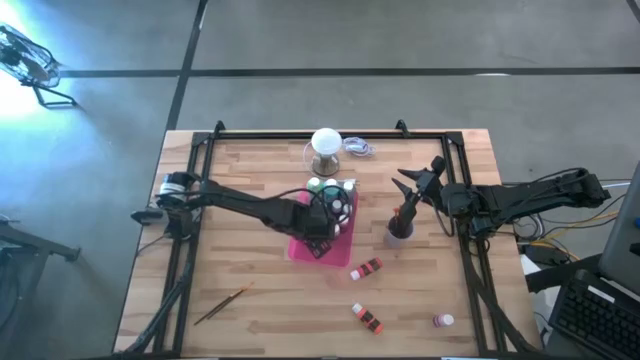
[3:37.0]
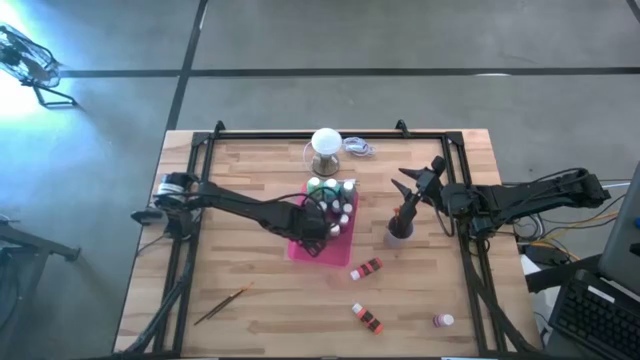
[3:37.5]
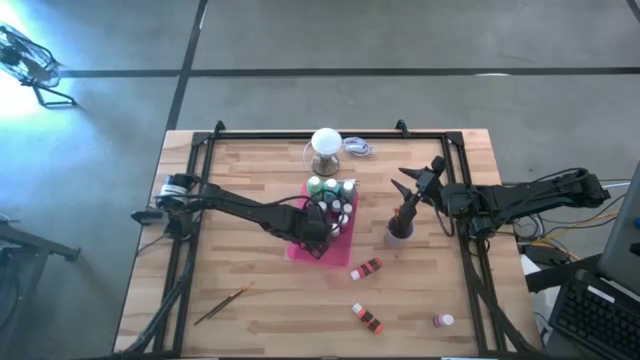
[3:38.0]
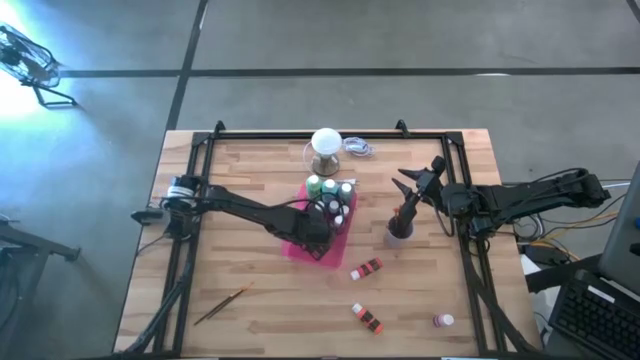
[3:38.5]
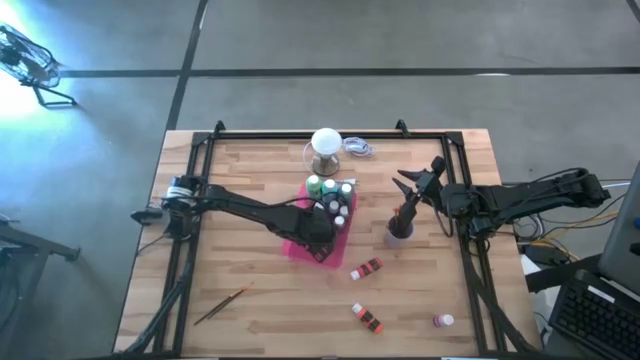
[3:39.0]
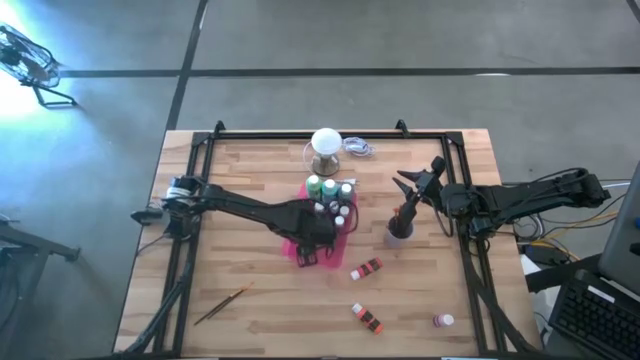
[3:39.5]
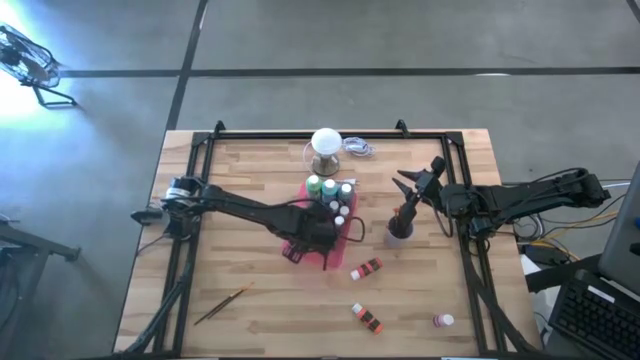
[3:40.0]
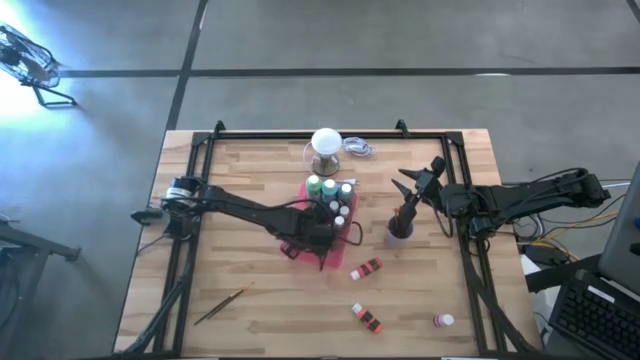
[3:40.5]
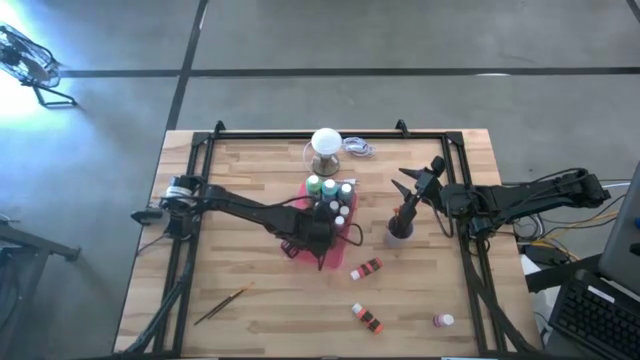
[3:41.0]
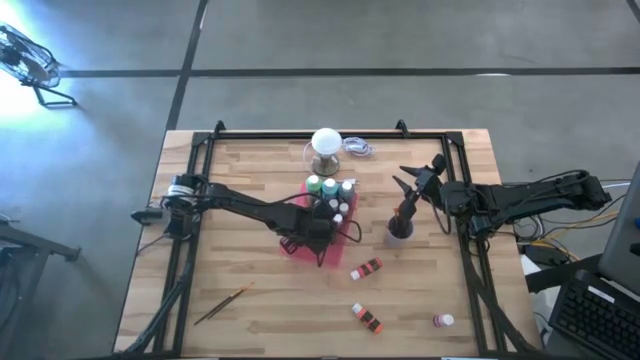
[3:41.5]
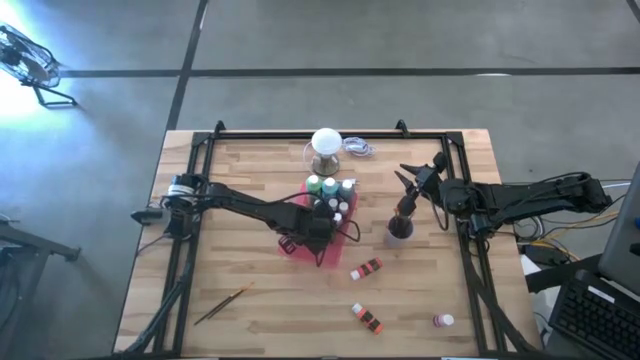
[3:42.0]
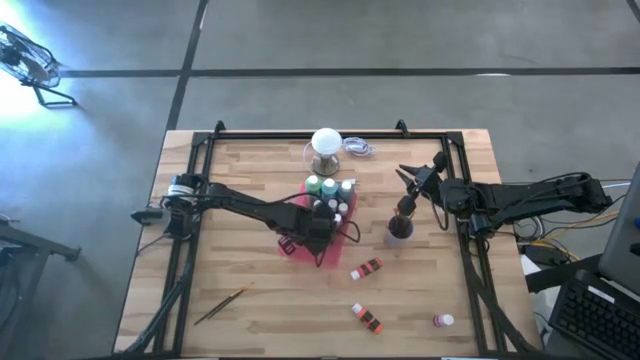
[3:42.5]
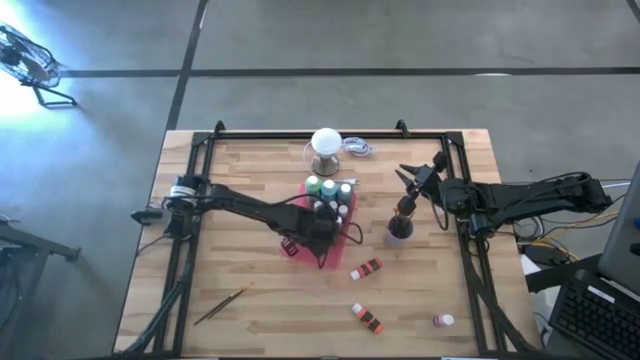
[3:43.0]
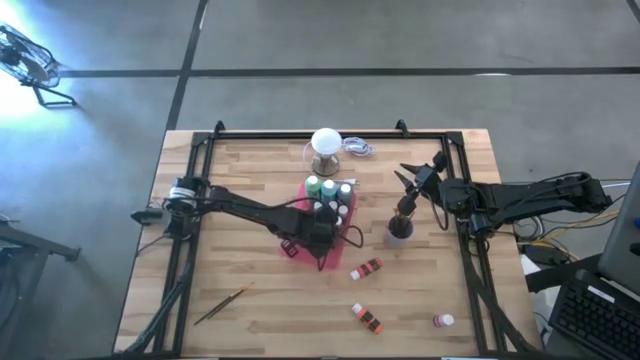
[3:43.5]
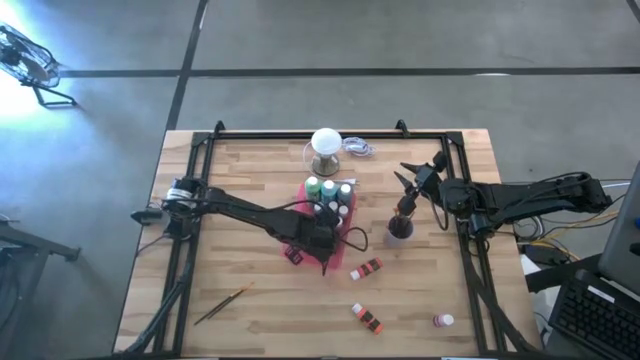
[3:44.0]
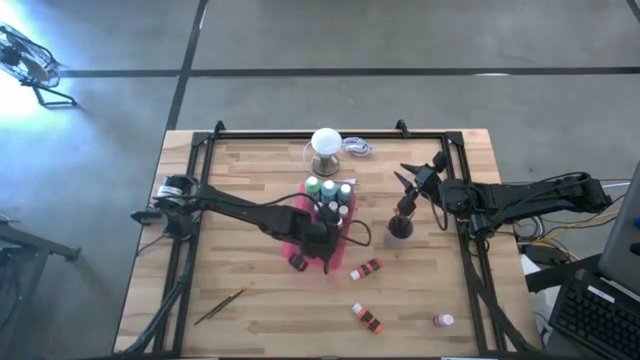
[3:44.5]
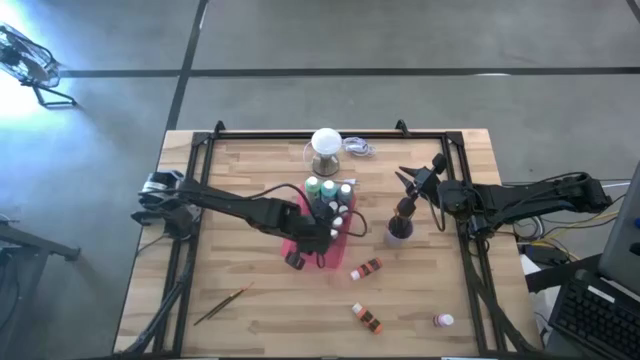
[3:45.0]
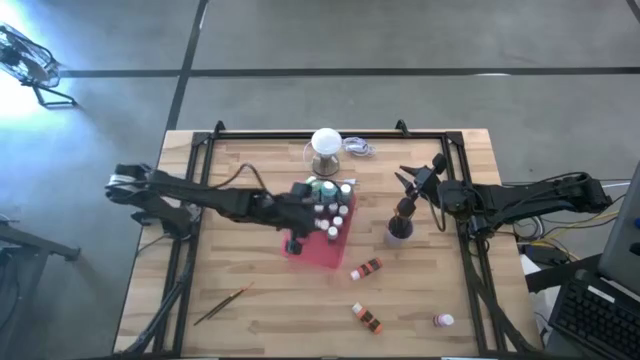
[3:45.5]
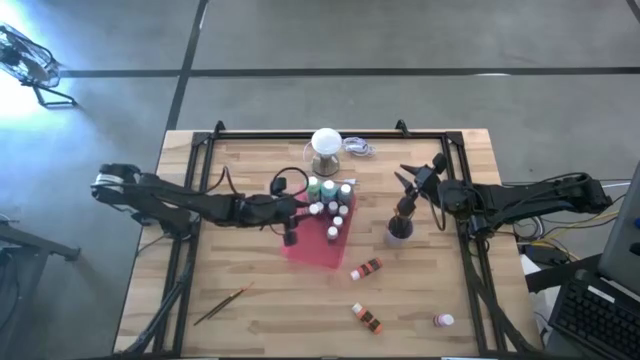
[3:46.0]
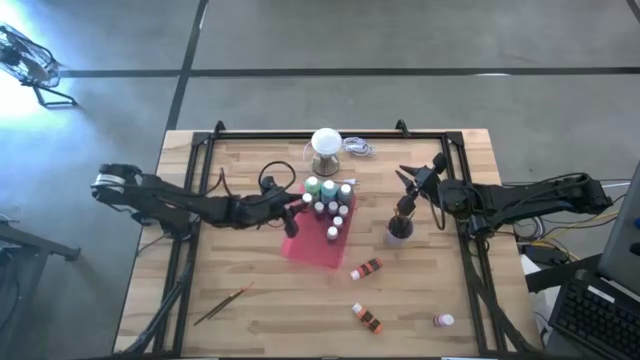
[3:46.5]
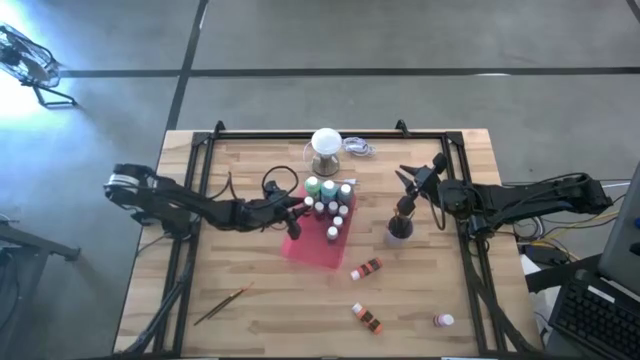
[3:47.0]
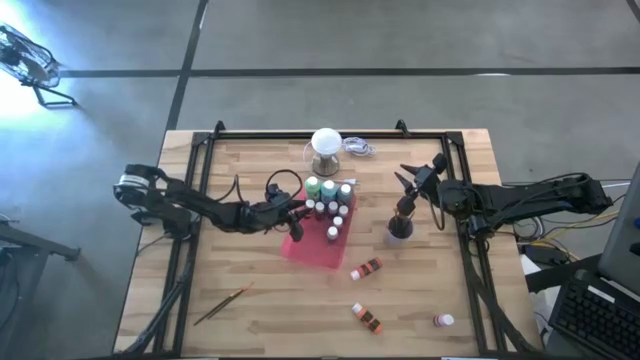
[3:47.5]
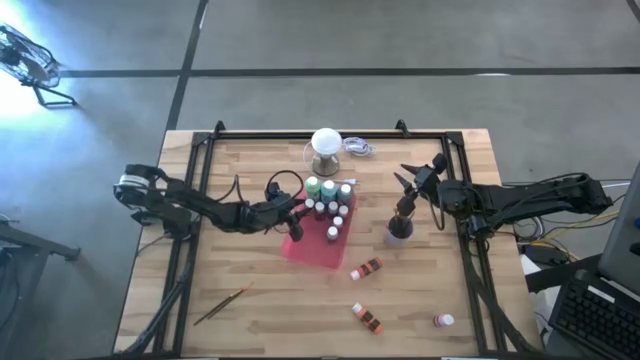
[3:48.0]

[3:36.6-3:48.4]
Task: Pick & Place Paint Supplies
Adjust the small yellow paint bottle in the red bin

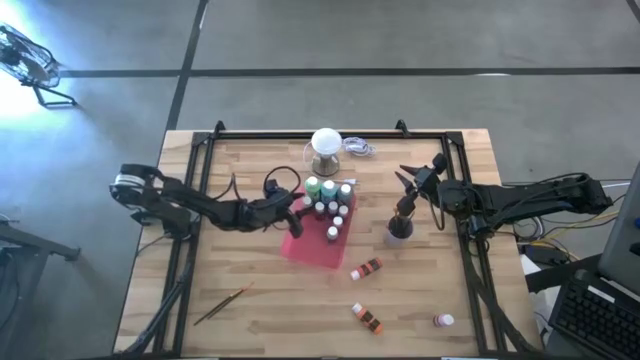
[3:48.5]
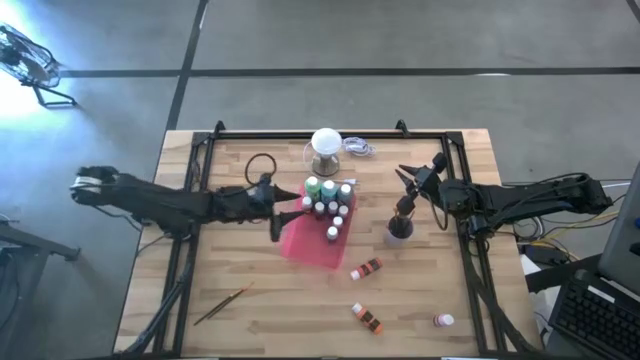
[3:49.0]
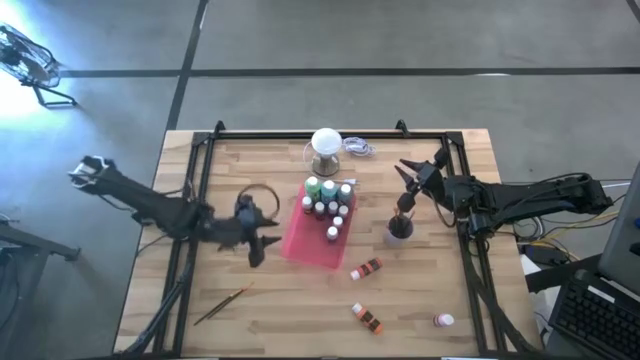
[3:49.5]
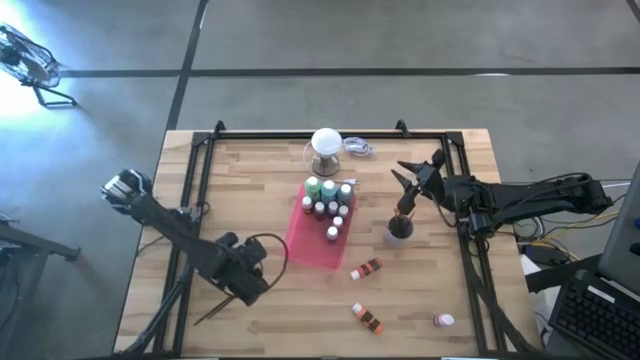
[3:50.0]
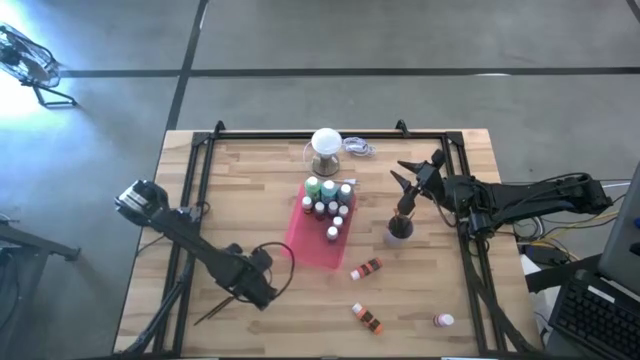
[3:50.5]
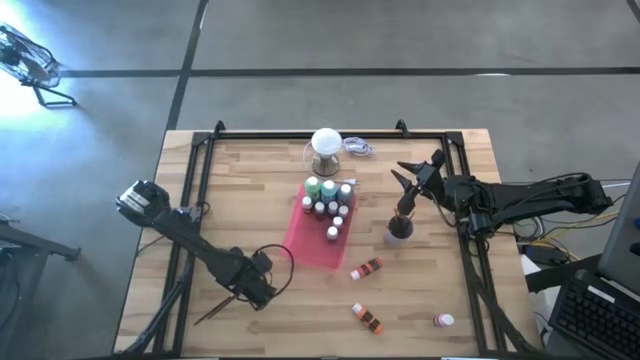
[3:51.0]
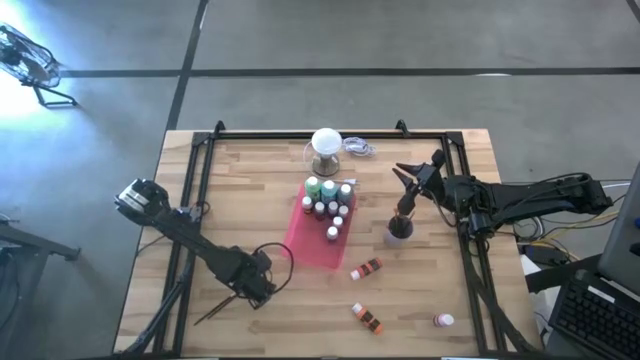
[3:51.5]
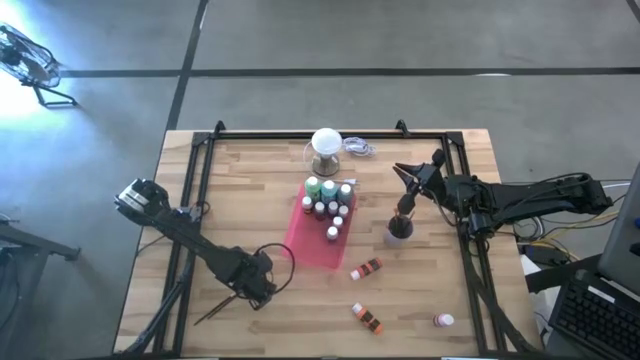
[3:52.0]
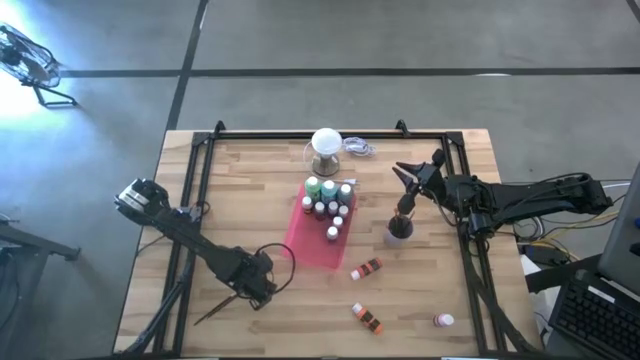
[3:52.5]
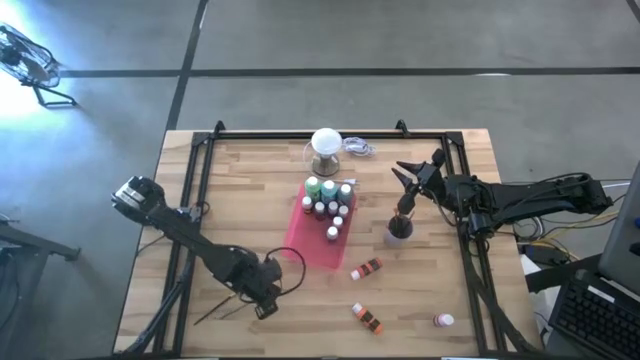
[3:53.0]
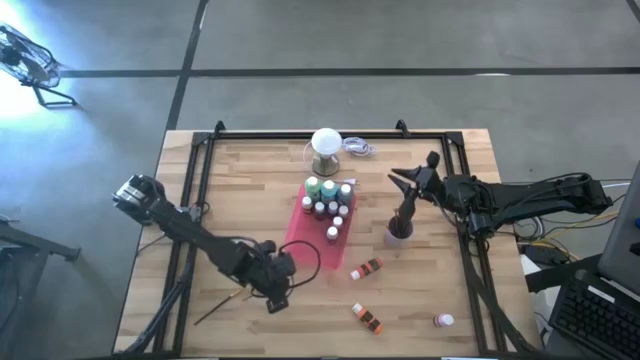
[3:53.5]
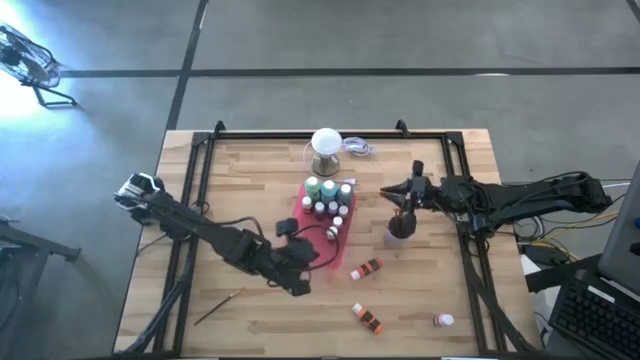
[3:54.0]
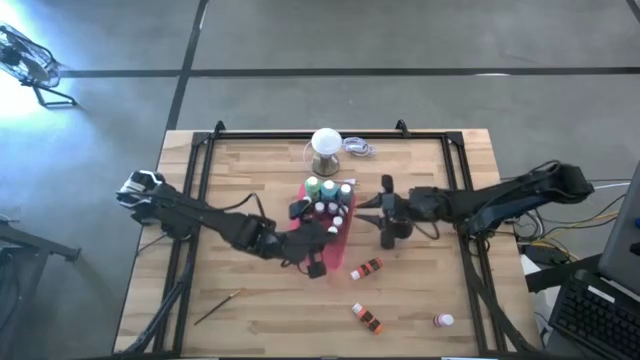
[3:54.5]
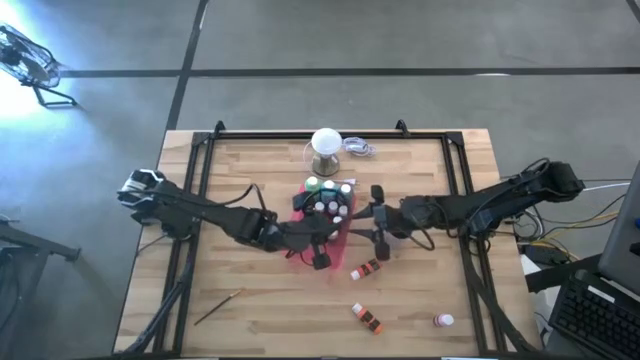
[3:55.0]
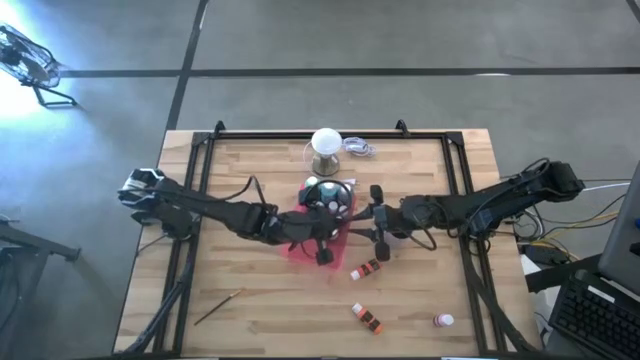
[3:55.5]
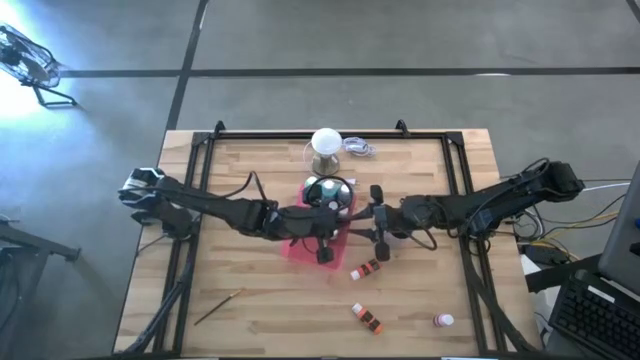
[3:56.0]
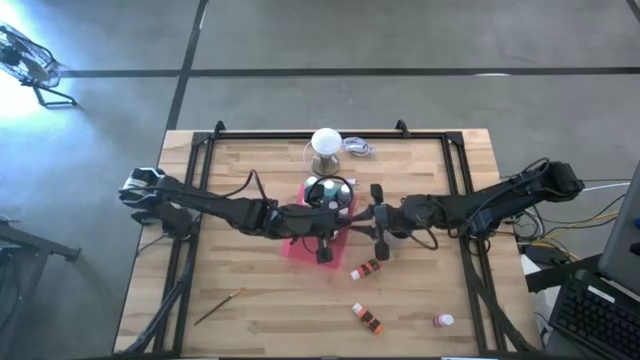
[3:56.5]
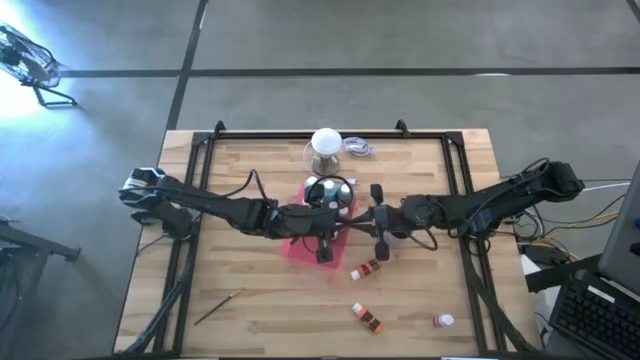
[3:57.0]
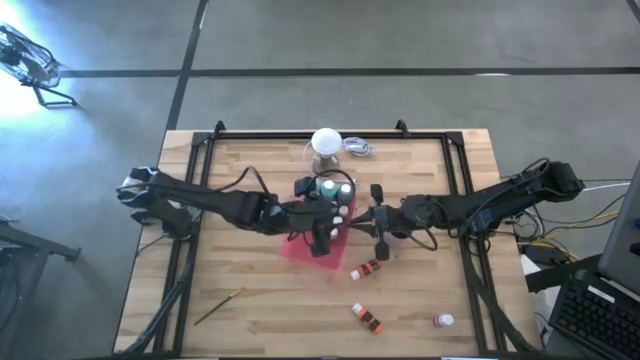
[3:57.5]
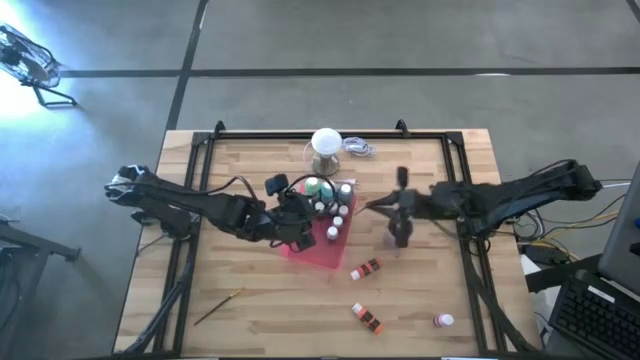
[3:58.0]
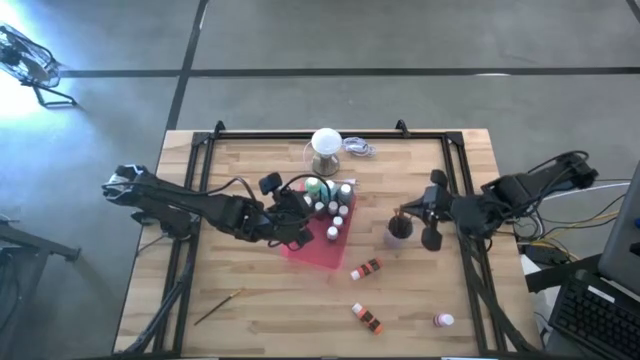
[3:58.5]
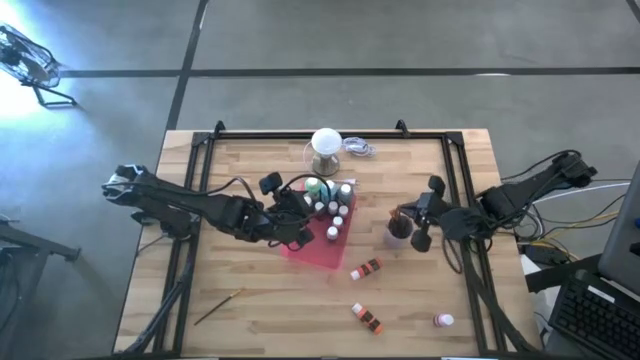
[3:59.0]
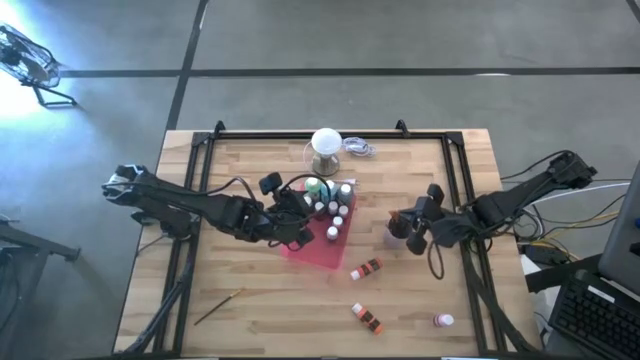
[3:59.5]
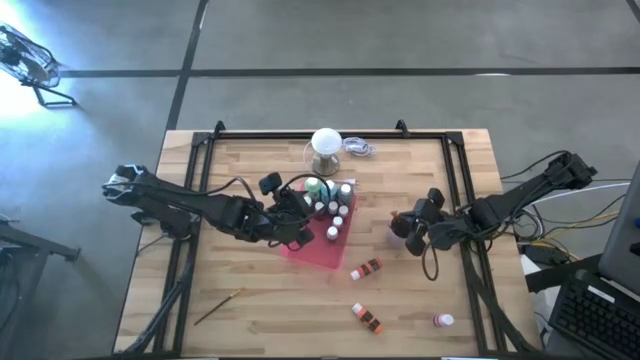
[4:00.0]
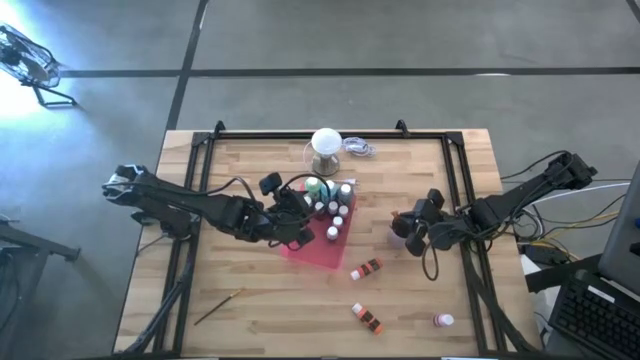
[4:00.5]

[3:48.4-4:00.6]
Put the orange paintbrush into the purple cup
